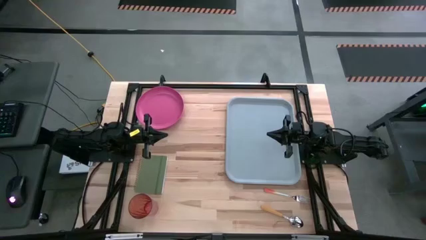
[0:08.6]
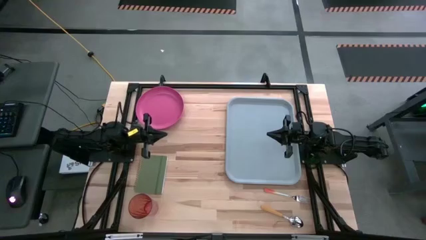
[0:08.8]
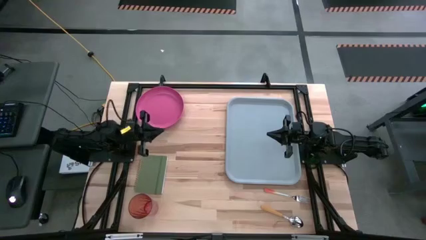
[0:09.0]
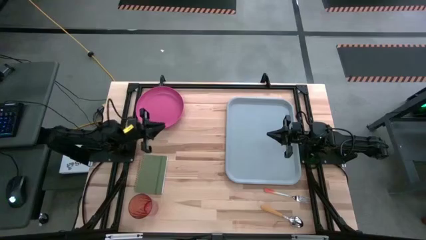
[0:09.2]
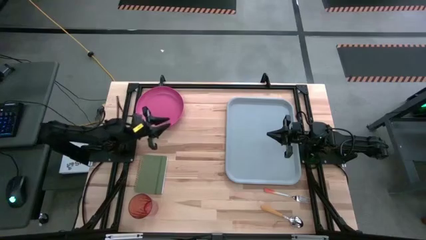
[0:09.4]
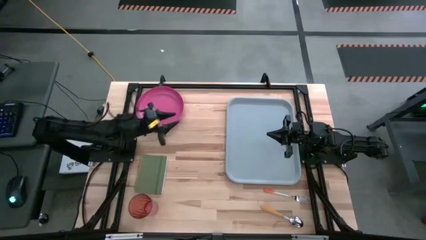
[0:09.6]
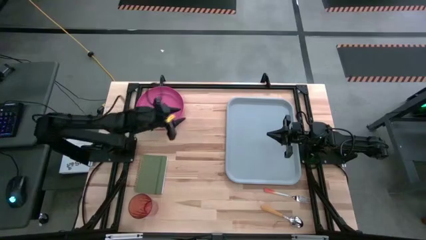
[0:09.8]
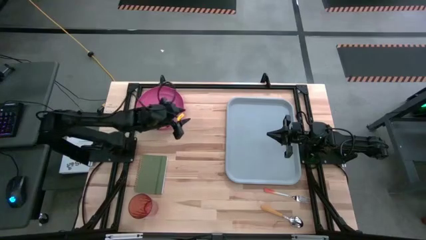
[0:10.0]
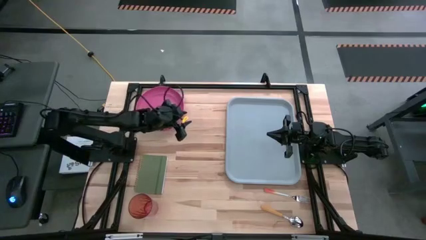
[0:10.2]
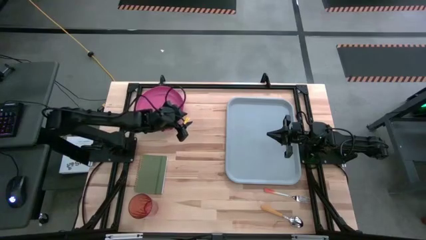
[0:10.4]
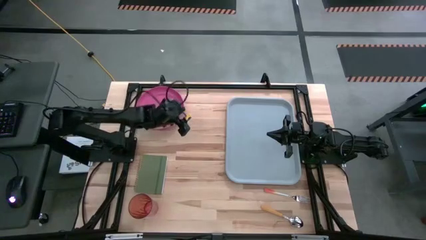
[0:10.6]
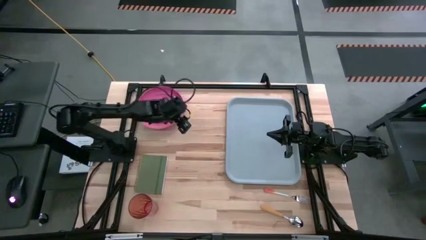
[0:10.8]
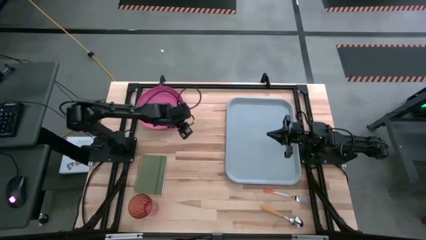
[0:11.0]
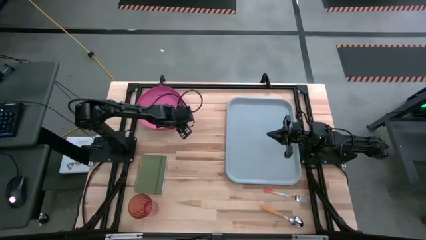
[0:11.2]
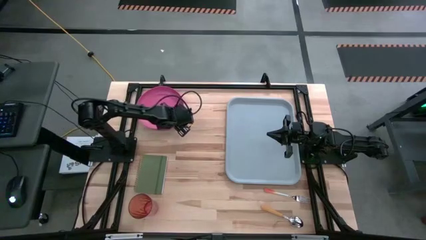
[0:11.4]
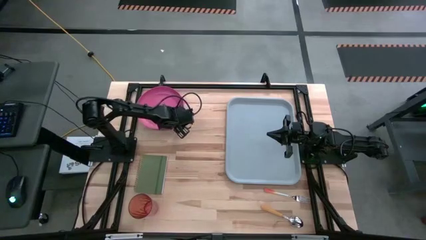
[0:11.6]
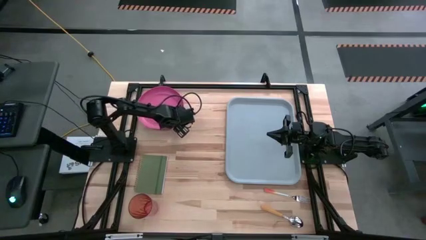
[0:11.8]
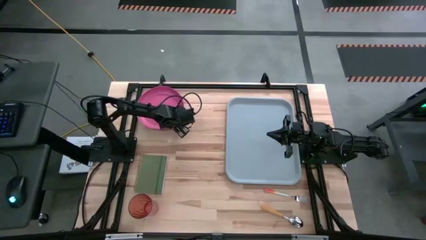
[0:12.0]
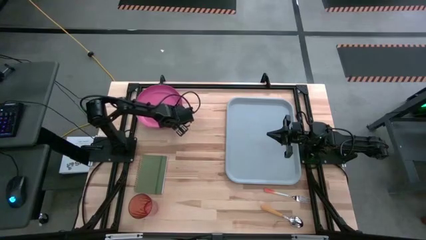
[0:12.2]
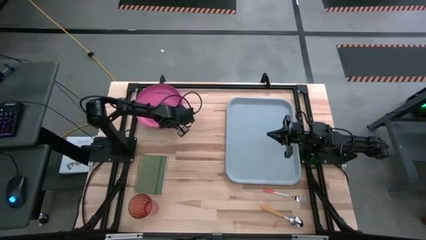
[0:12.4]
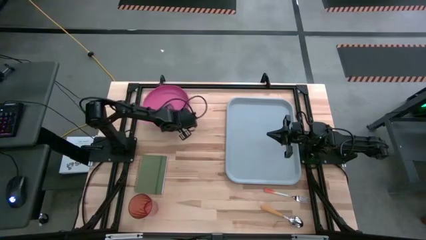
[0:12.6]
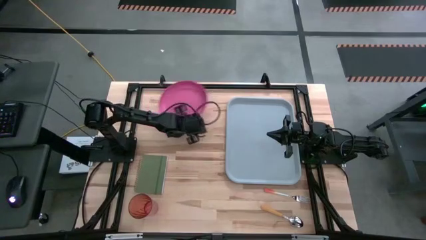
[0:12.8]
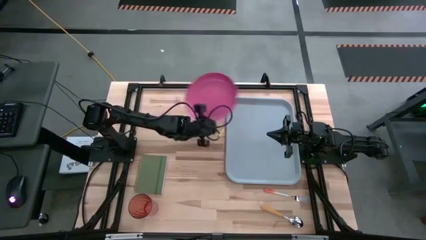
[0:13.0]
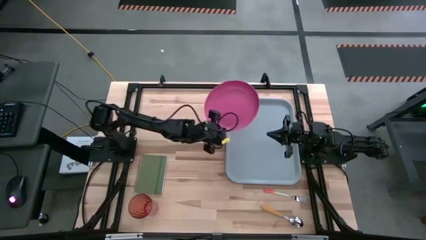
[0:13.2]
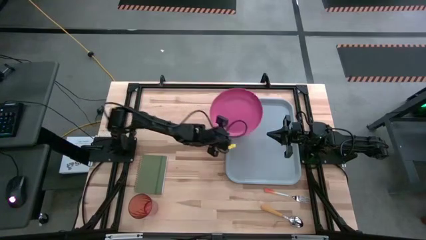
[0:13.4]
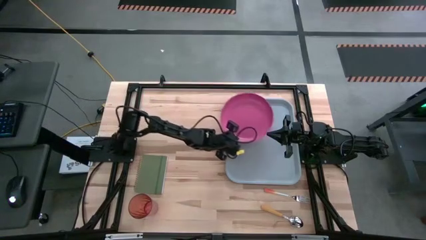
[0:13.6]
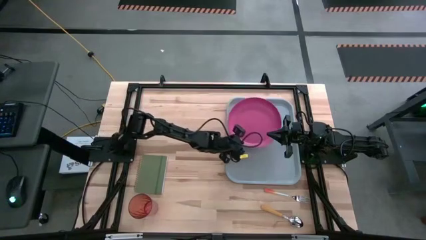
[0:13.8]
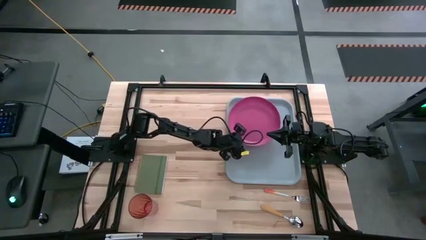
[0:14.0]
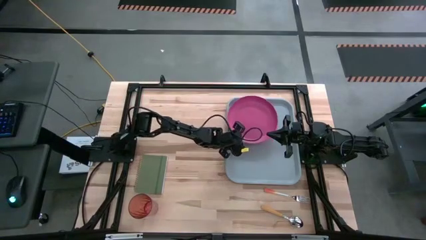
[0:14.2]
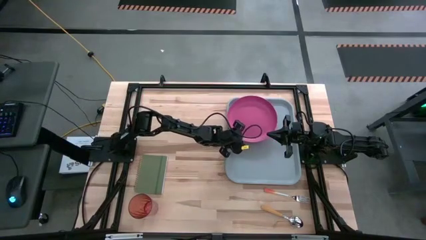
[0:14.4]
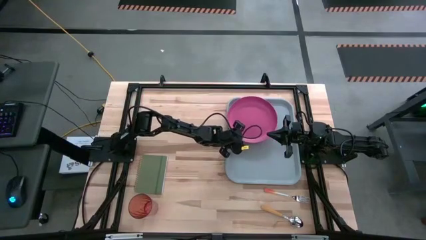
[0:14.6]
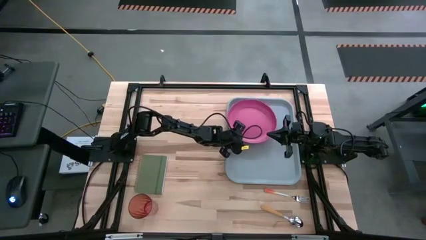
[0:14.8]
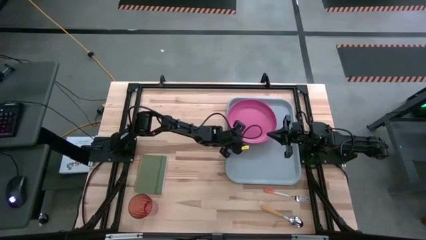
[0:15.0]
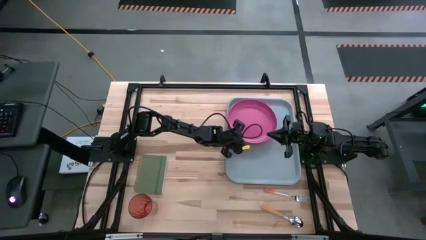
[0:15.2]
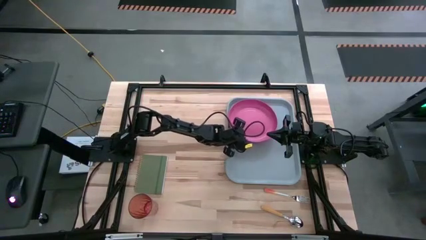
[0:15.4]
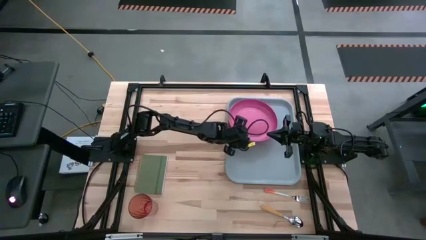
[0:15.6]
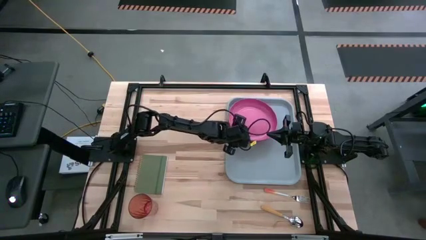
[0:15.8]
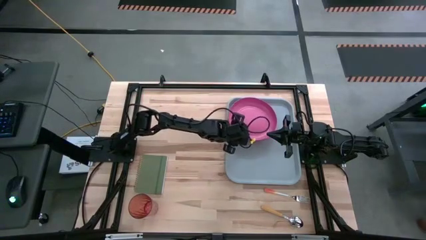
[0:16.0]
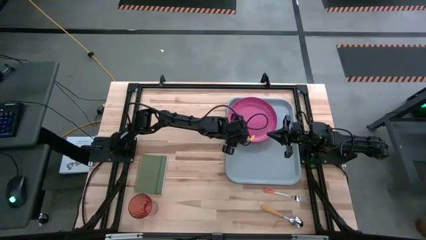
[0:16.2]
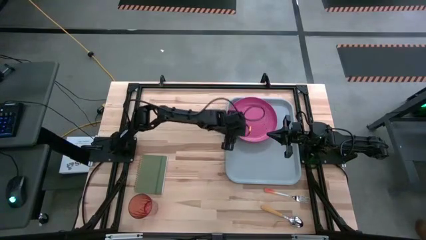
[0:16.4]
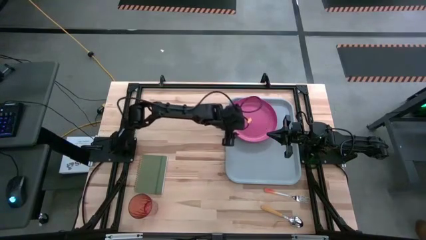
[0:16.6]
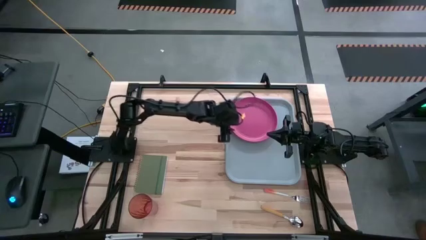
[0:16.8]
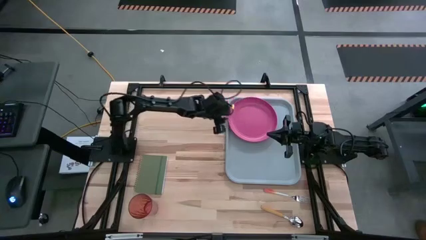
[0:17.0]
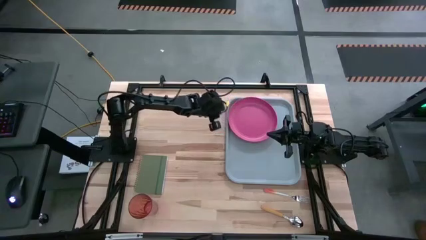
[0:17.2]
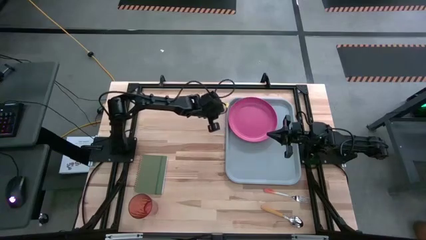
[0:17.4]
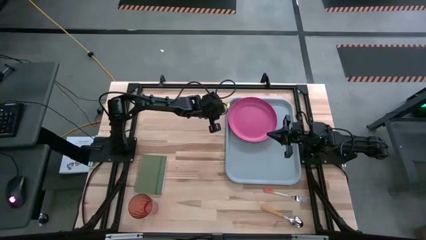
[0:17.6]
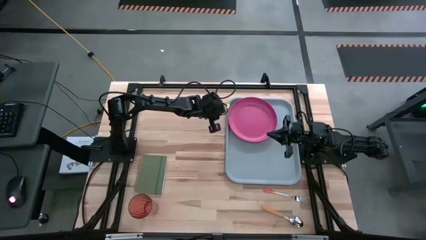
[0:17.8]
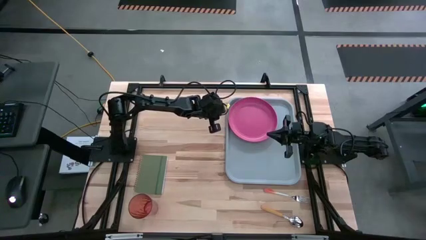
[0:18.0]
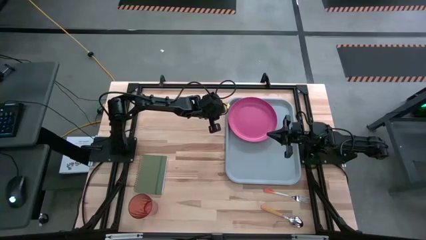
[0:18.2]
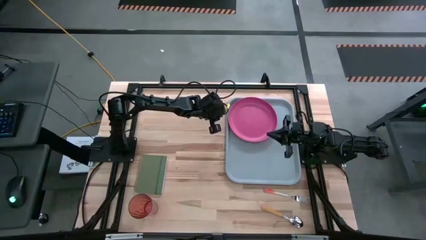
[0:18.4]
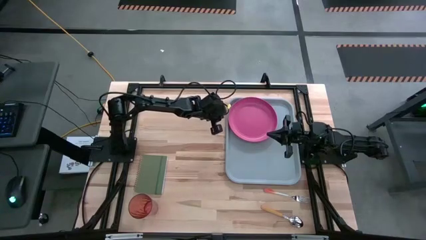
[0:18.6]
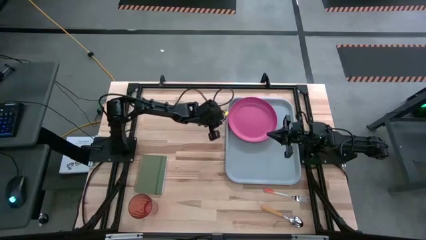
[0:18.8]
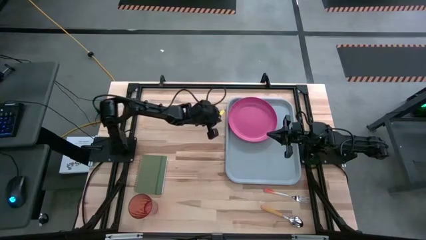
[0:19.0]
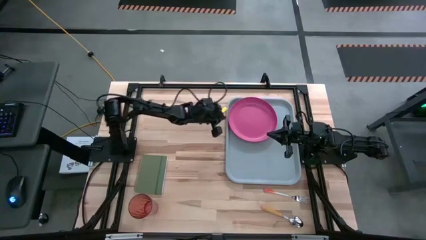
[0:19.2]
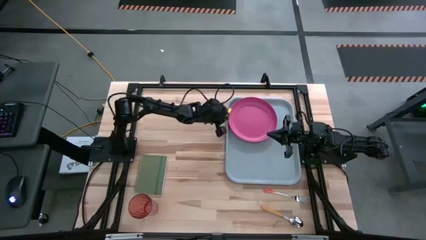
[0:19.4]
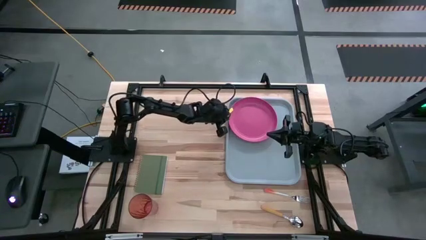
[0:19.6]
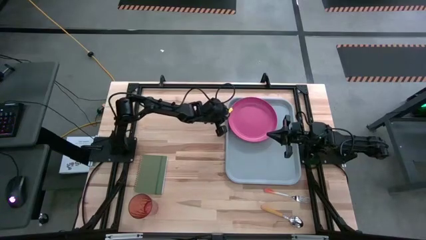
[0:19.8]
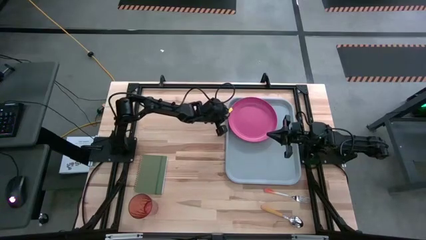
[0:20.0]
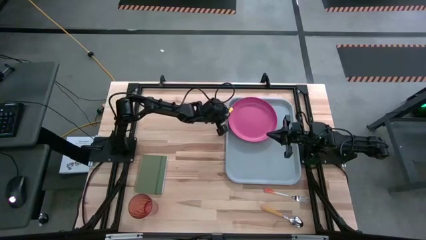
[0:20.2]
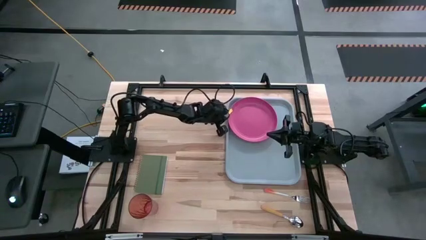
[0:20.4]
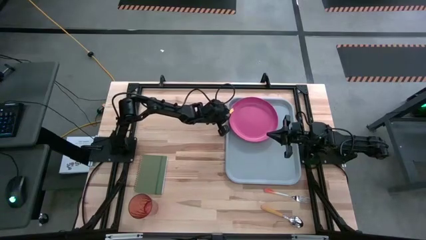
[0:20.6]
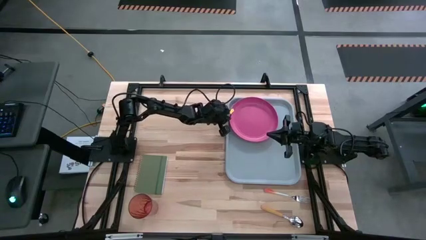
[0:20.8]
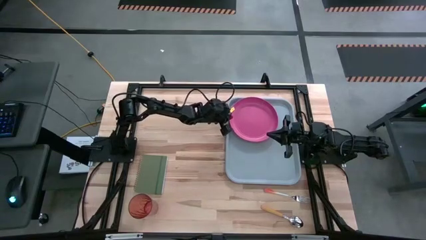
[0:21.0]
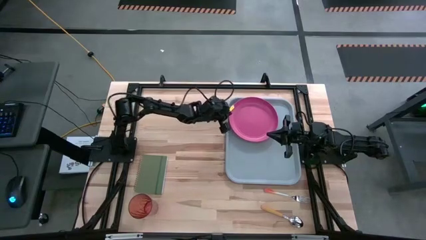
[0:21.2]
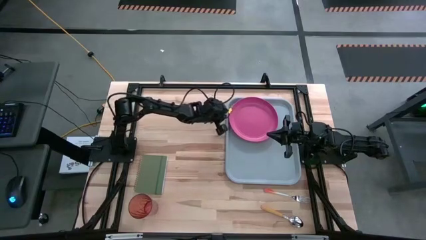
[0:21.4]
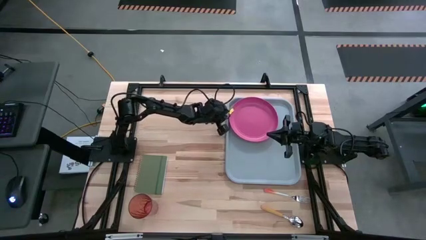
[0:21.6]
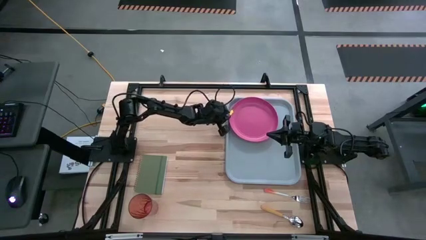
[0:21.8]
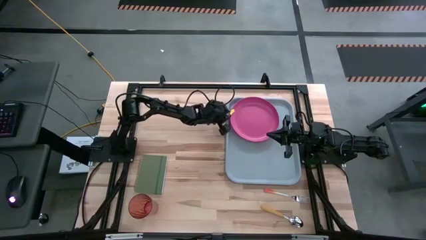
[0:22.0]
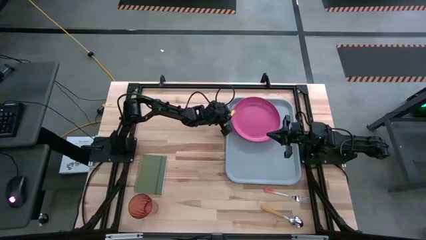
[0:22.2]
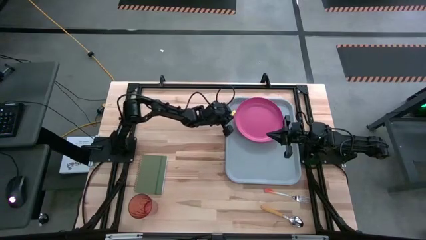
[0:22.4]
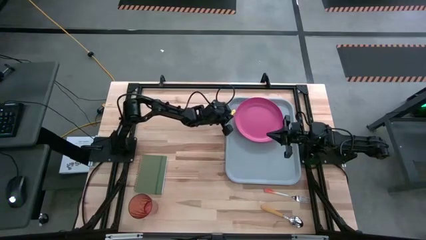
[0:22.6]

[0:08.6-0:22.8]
Task: Pick and place plate/cup/fork/spoon on tray
Put the pink plate on the light blue tray
